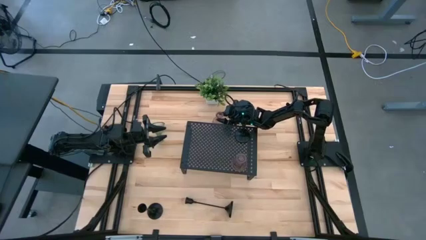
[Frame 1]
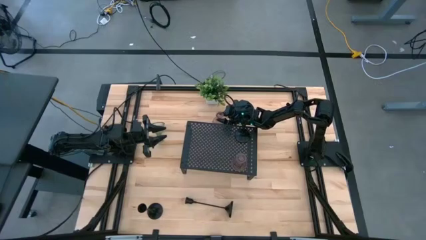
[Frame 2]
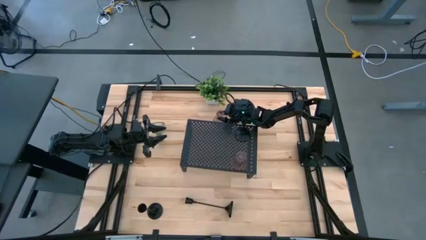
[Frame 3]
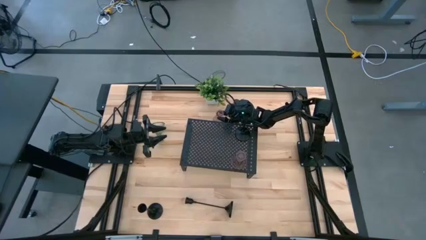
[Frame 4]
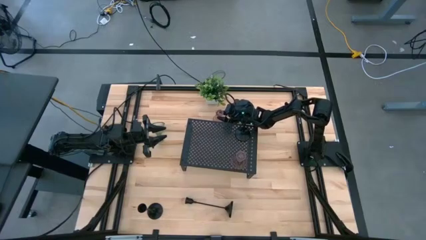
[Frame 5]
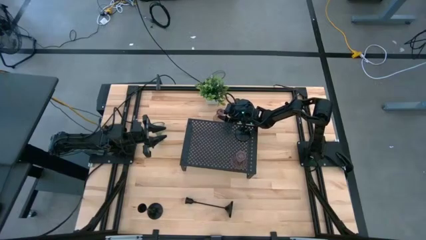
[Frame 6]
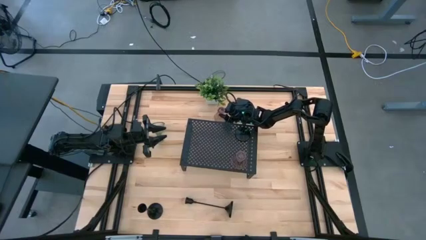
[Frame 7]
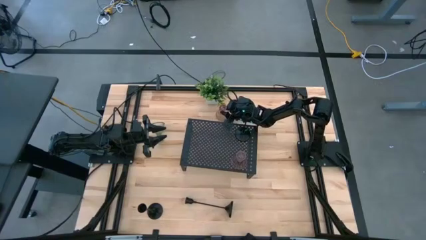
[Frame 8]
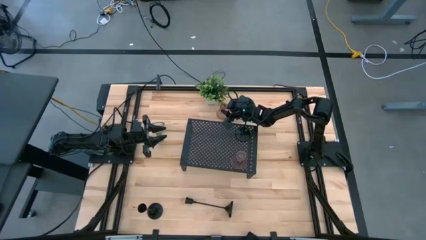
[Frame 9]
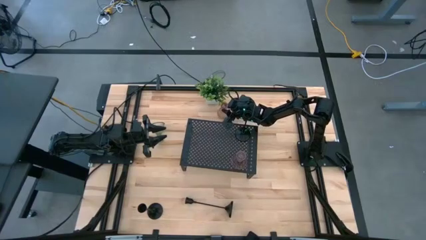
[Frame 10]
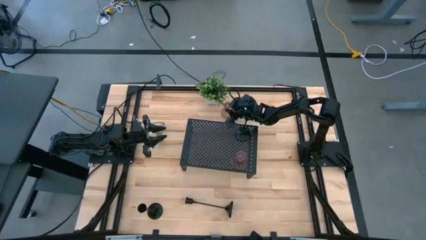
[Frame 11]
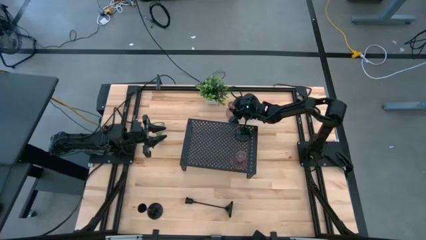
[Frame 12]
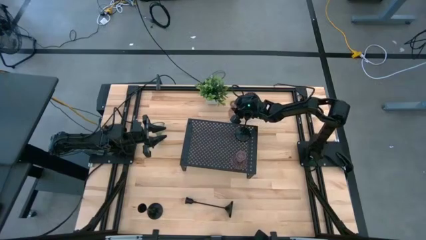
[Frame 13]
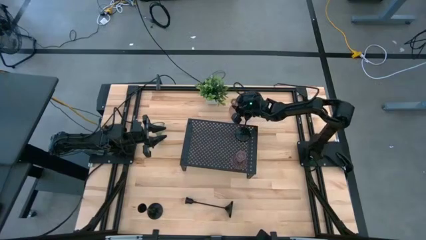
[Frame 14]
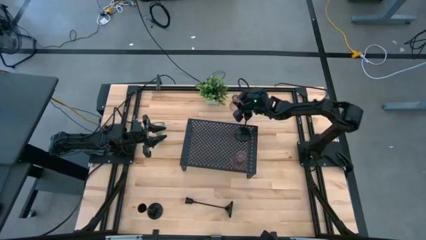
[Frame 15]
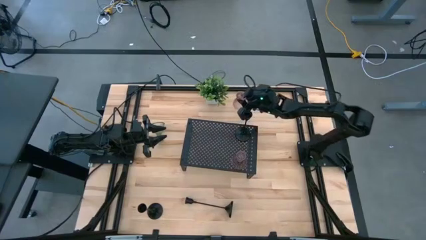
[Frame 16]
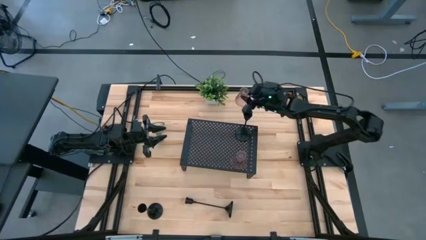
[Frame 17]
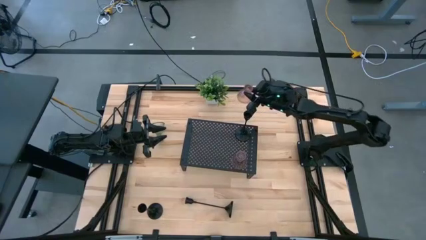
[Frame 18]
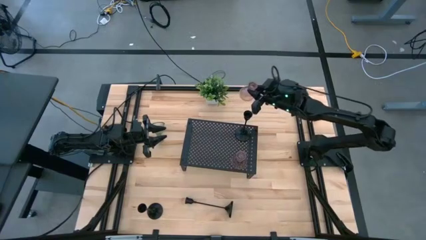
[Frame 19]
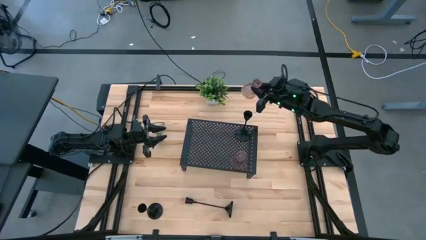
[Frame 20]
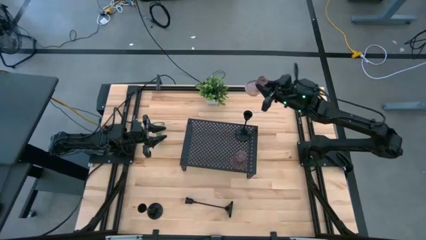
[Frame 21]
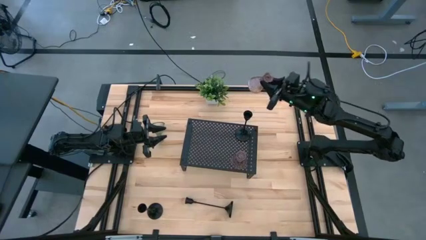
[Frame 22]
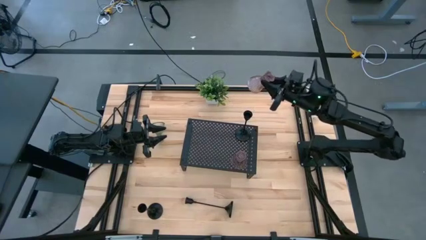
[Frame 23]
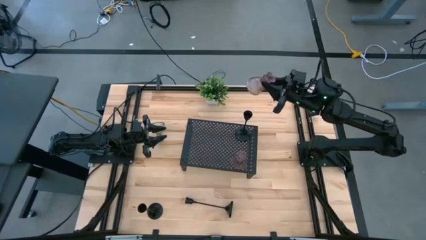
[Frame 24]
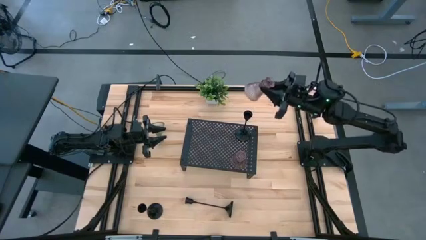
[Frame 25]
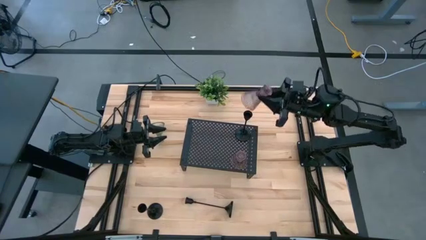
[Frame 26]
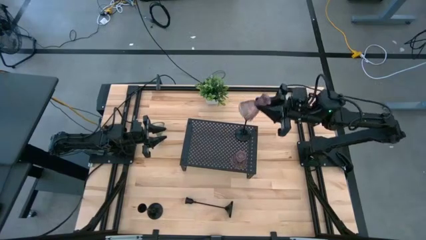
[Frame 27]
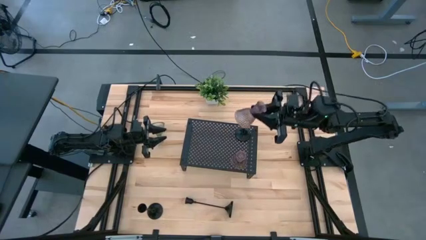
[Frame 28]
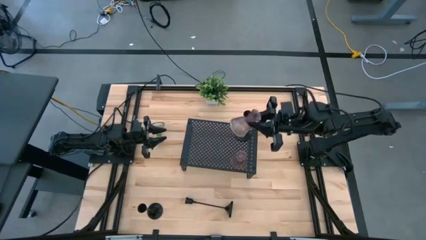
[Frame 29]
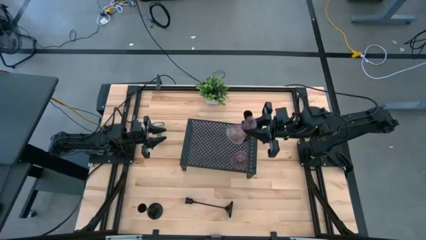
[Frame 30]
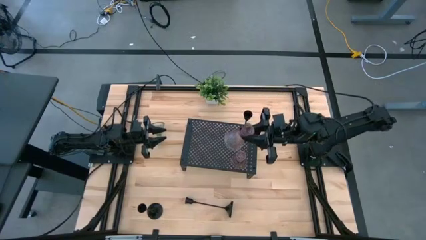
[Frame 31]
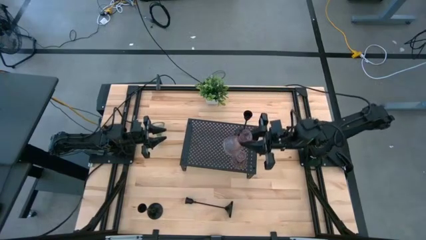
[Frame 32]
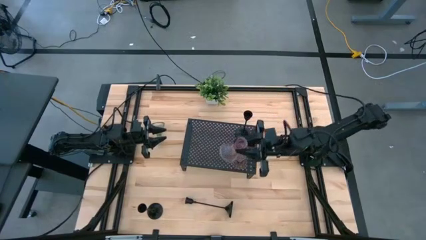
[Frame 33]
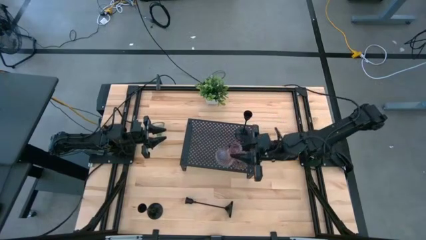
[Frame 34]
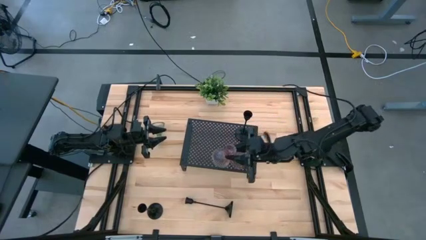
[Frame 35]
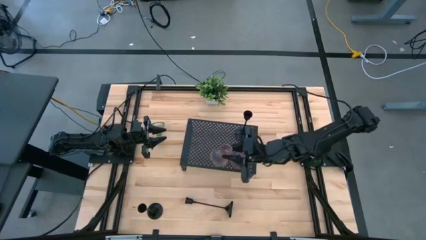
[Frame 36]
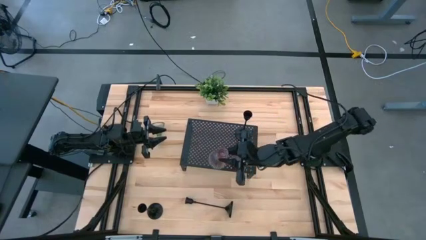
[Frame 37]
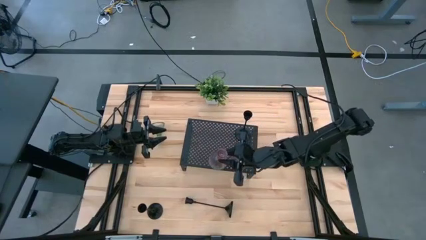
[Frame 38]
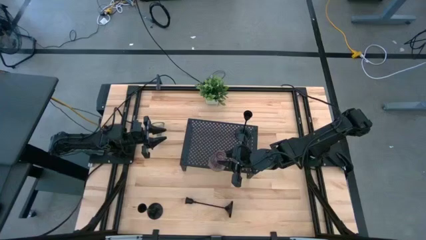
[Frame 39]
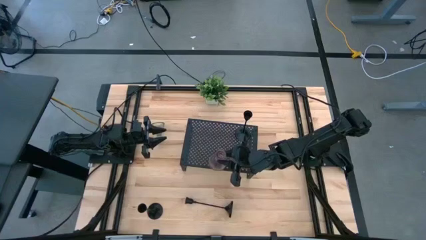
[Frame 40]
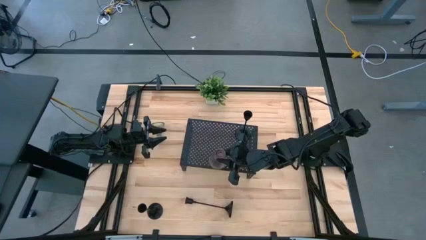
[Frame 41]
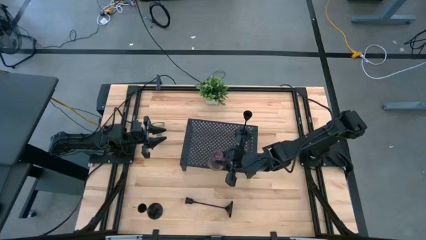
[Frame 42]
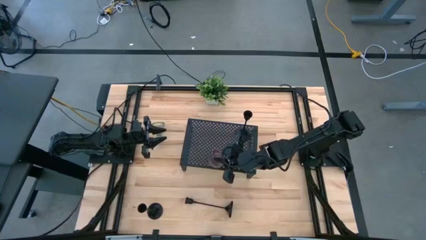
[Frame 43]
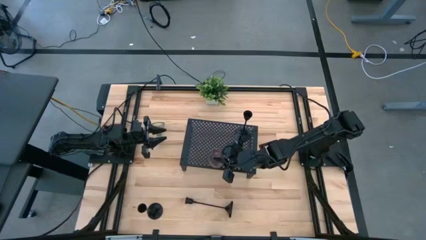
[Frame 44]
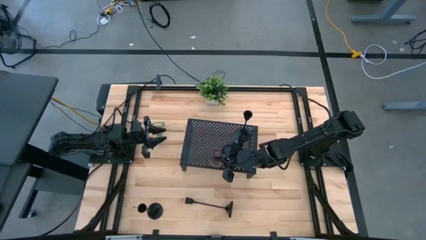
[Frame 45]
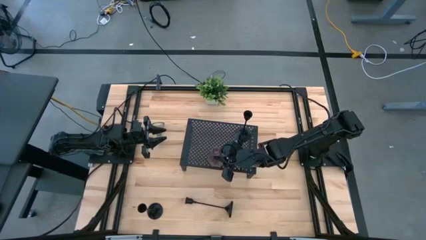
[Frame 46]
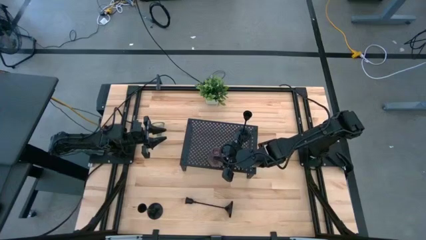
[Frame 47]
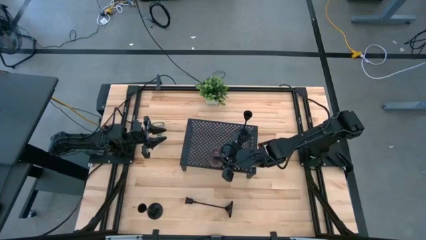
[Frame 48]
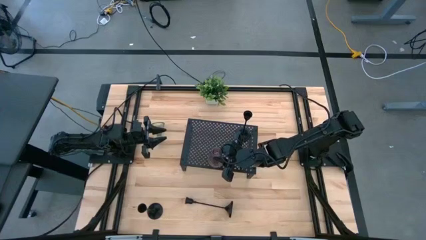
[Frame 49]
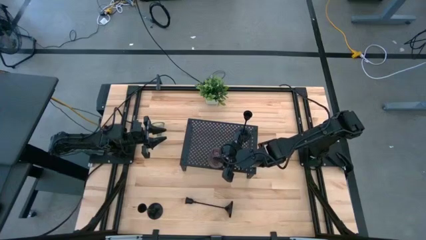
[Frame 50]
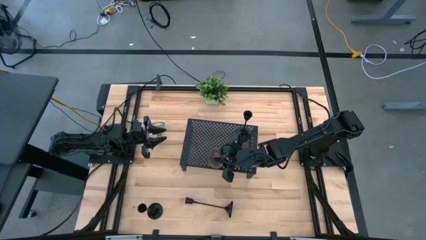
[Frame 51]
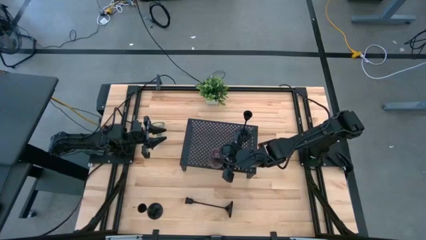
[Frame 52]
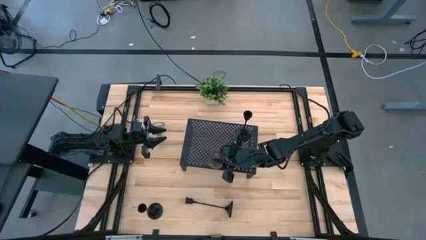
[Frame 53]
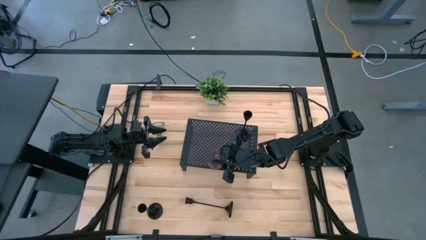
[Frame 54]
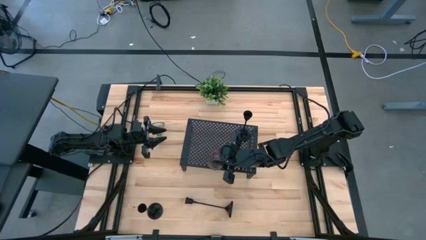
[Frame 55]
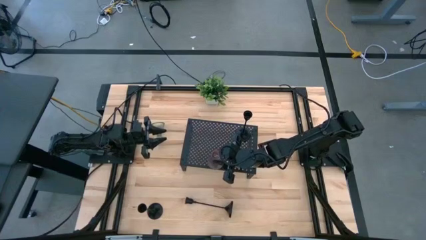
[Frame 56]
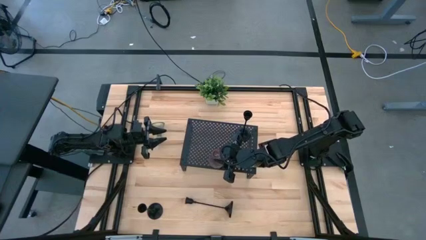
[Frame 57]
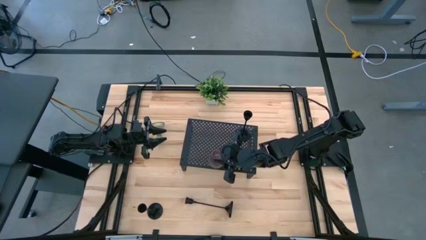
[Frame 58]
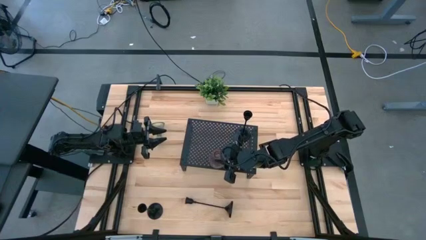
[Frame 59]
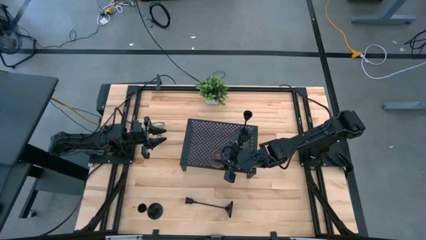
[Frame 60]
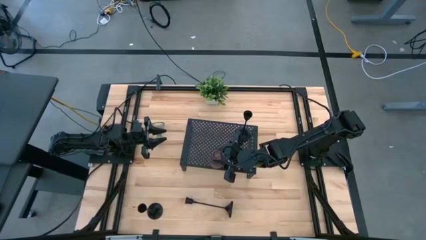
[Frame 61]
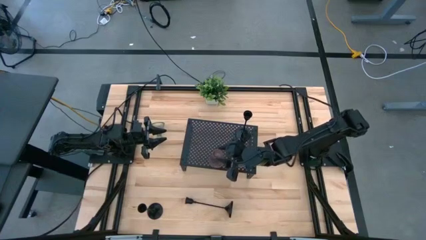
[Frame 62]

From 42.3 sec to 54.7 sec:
Task: Pick & Place candle stick holders
Put the pink glass candle holder on the shelf
